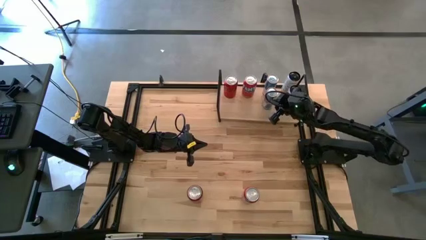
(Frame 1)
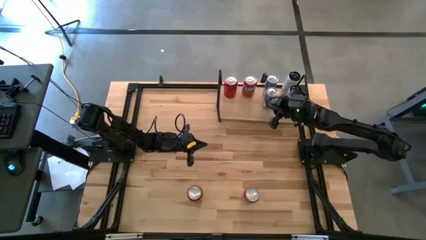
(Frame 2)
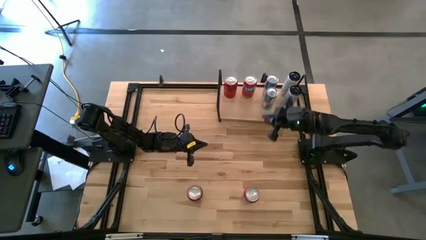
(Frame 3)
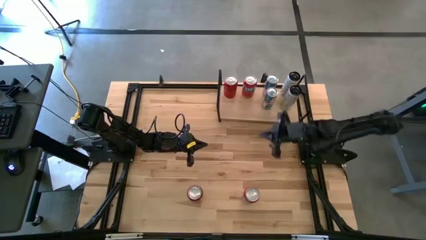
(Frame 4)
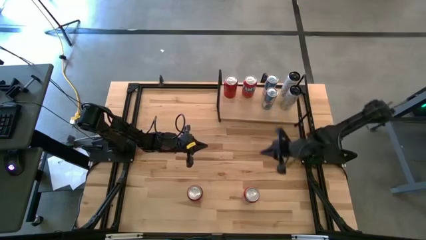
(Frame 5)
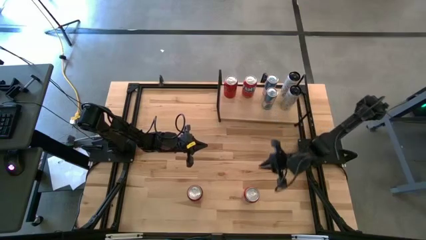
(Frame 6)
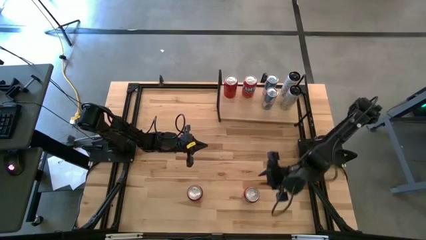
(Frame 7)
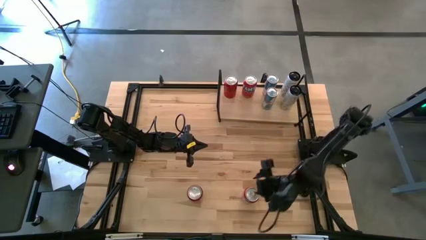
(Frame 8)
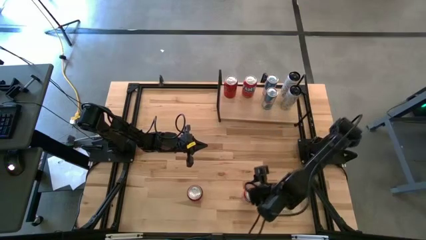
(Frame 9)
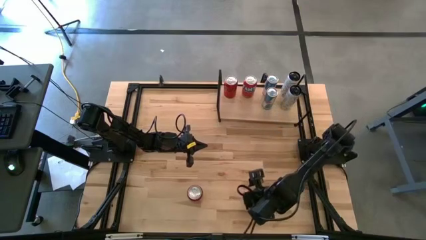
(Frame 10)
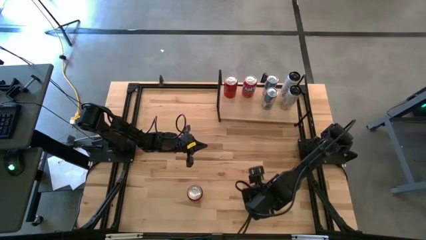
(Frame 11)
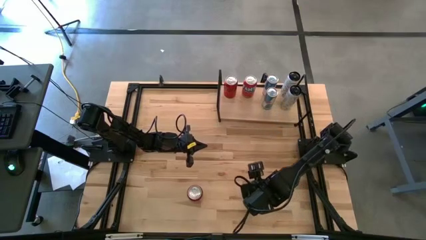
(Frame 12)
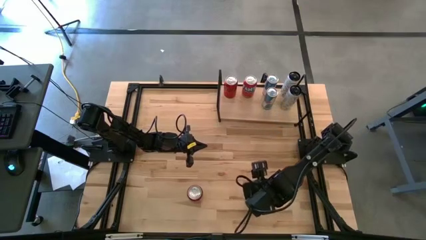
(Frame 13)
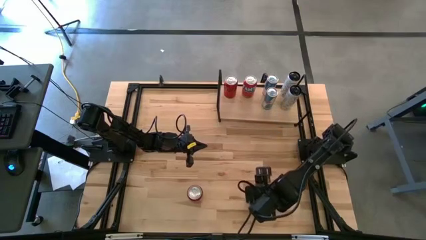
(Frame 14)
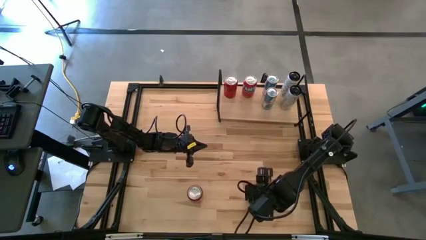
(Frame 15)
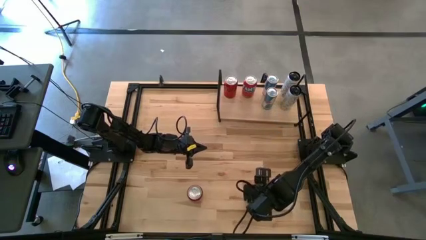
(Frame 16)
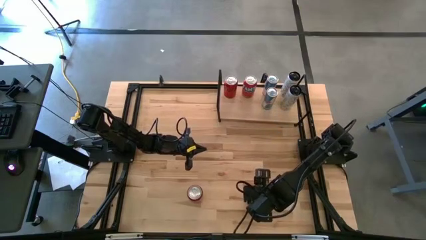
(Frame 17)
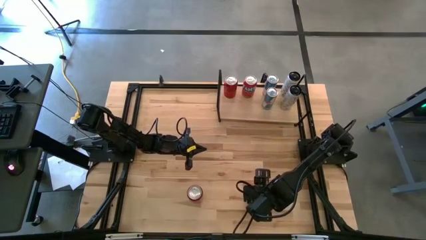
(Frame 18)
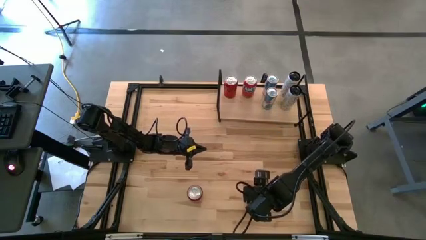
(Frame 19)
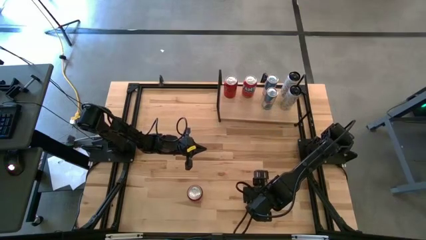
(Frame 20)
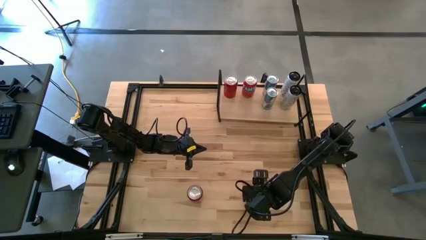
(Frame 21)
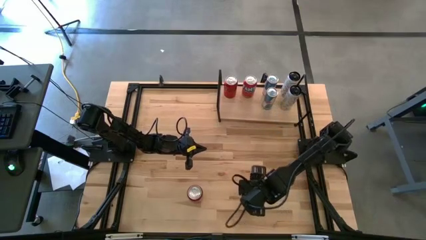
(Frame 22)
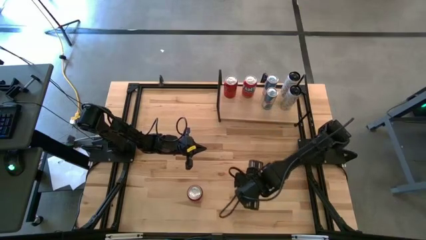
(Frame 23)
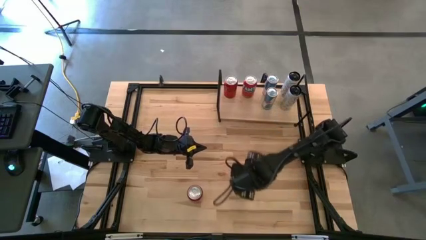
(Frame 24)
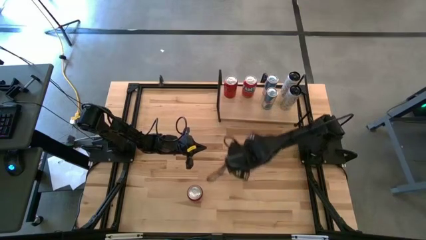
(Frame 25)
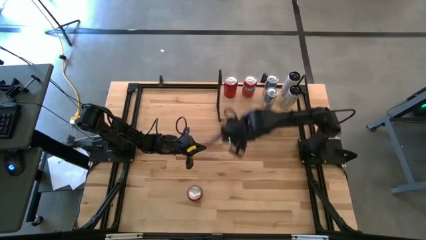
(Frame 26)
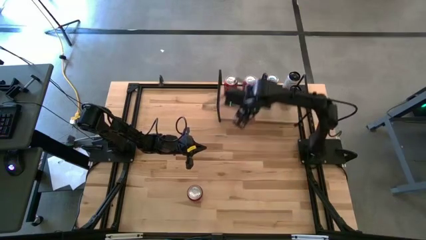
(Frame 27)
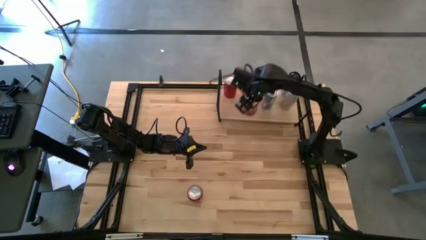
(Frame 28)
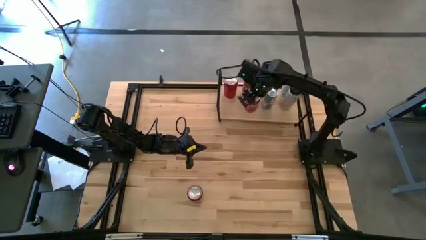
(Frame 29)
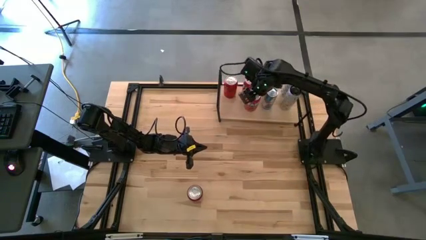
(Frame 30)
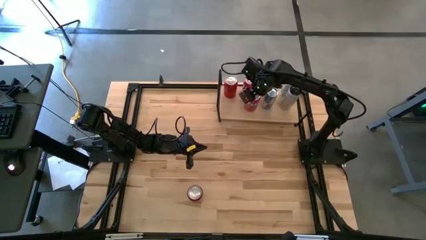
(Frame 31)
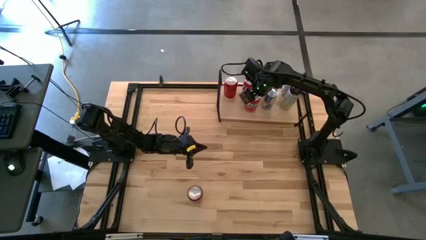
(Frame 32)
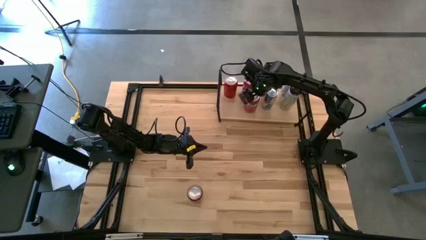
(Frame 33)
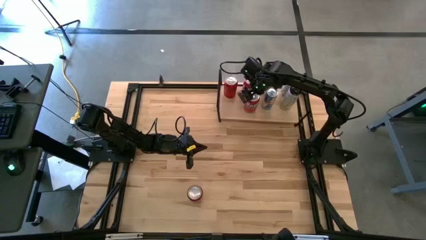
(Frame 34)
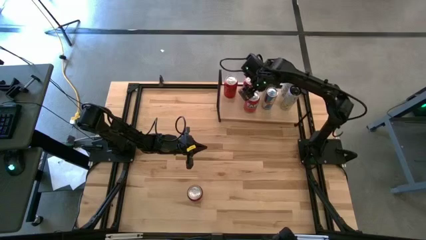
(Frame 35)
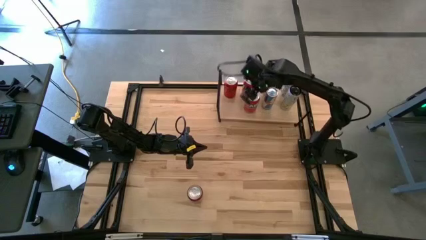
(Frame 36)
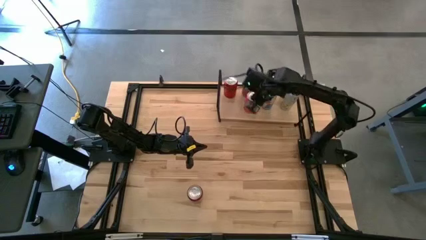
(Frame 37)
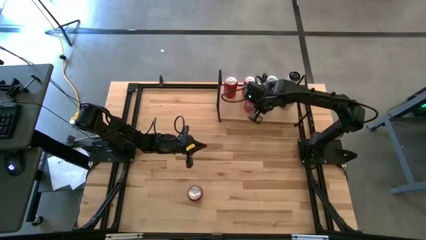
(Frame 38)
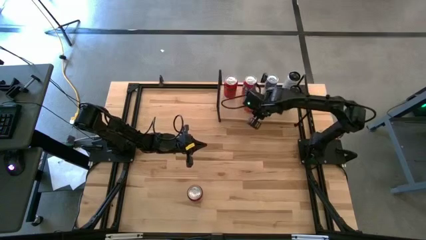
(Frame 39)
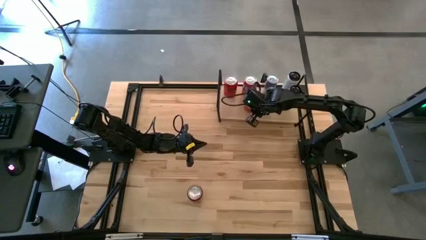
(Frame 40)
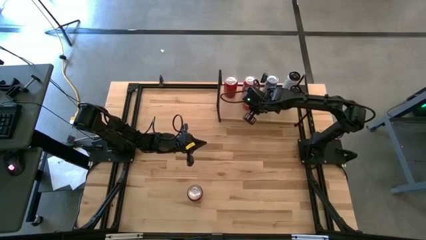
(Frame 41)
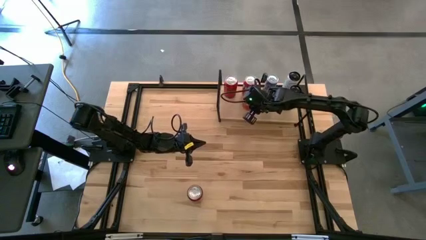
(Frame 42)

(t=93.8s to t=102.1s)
Task: Place canned beverage on shelf
Put the red soda can on the shelf aligned with the other red soda can

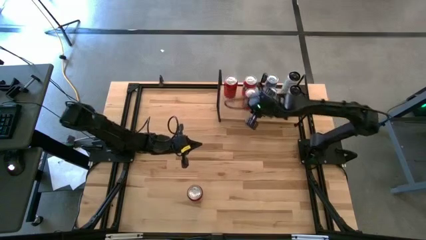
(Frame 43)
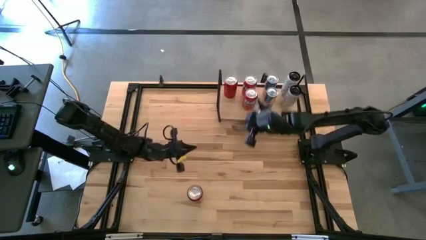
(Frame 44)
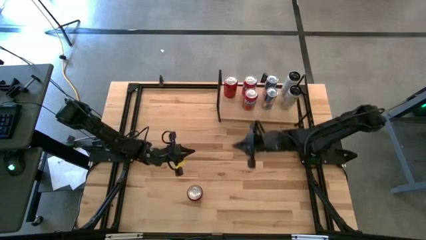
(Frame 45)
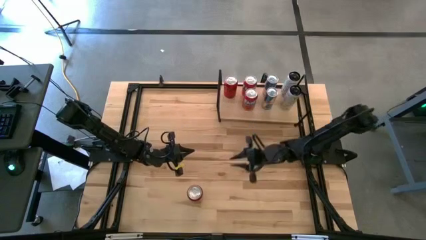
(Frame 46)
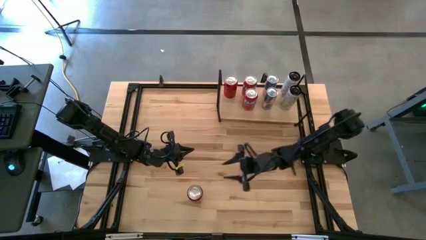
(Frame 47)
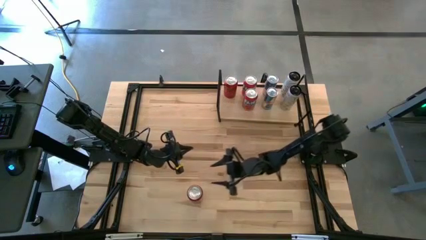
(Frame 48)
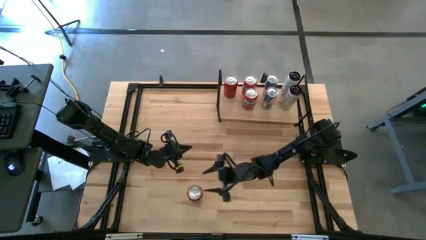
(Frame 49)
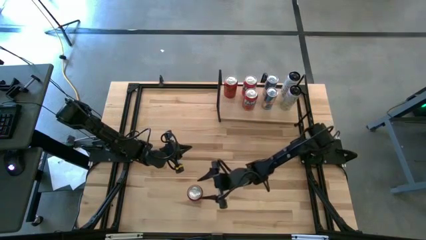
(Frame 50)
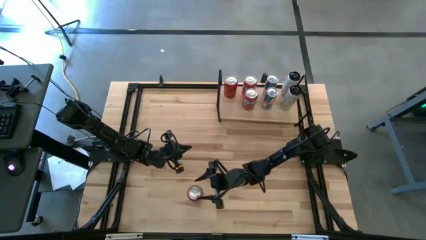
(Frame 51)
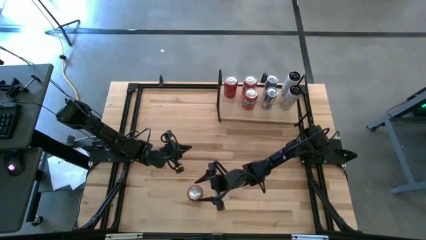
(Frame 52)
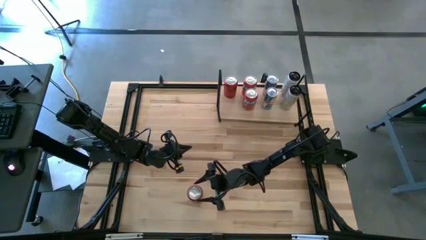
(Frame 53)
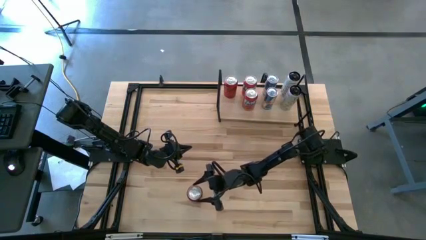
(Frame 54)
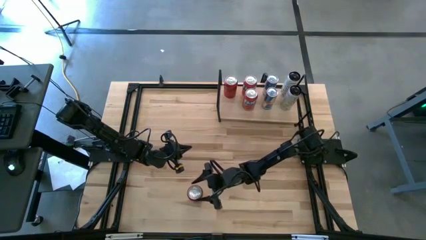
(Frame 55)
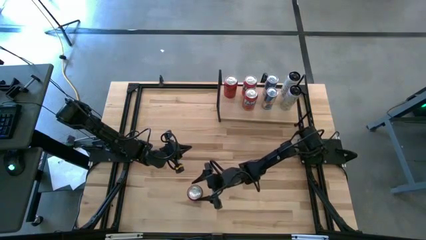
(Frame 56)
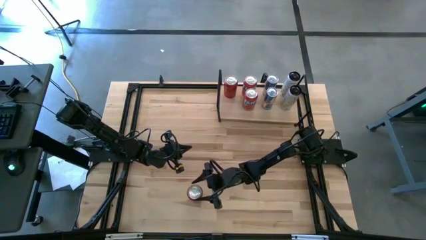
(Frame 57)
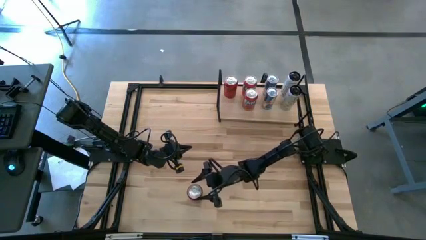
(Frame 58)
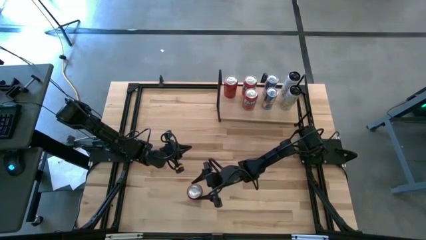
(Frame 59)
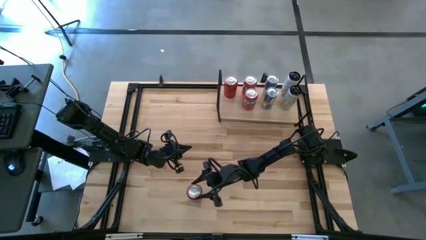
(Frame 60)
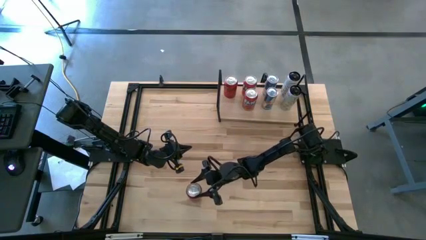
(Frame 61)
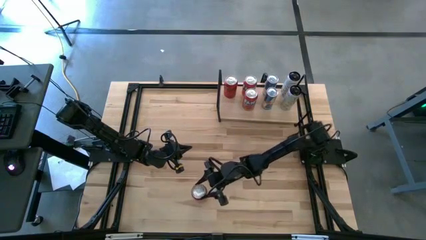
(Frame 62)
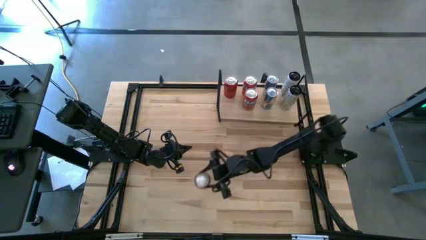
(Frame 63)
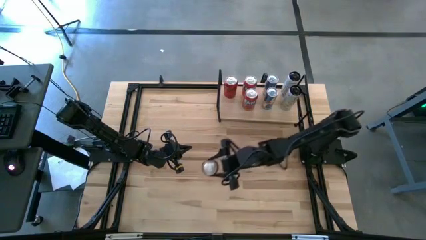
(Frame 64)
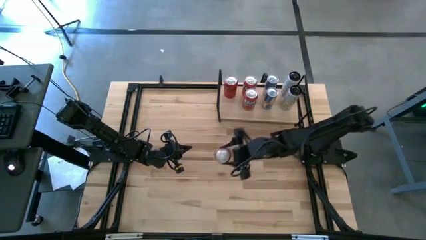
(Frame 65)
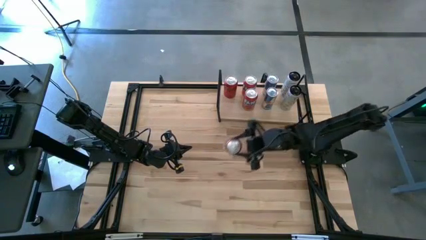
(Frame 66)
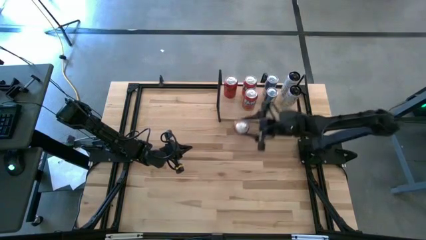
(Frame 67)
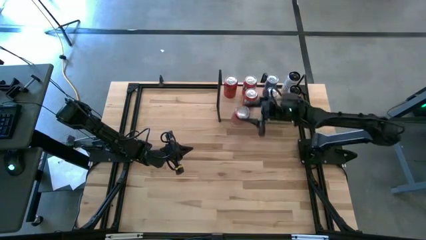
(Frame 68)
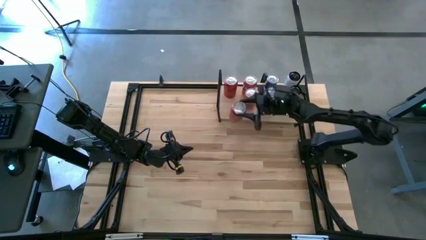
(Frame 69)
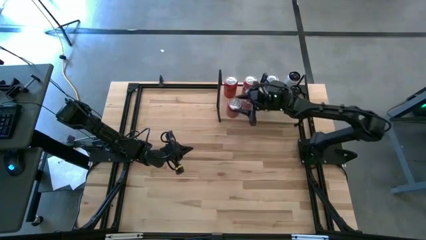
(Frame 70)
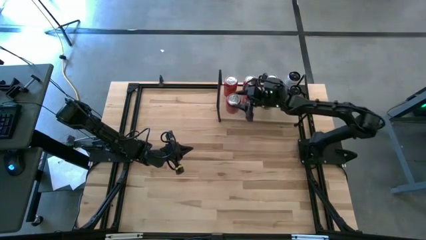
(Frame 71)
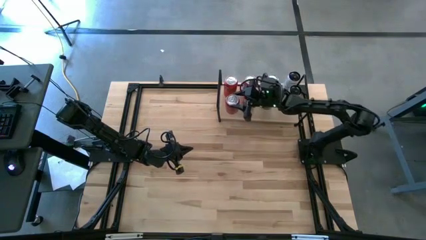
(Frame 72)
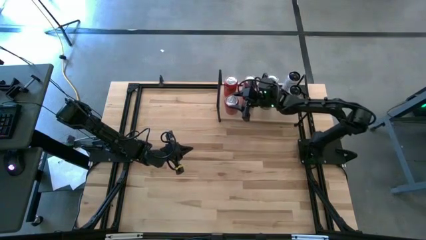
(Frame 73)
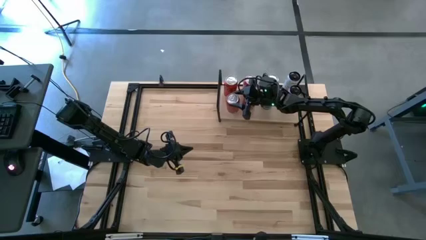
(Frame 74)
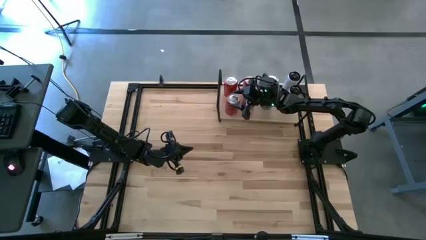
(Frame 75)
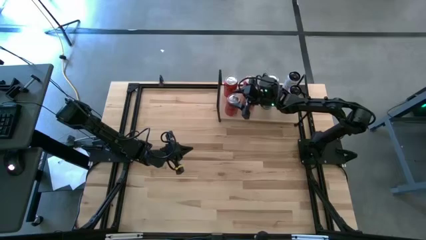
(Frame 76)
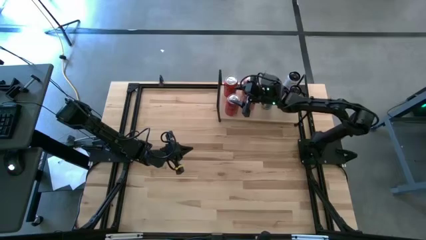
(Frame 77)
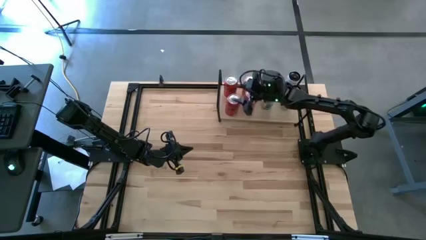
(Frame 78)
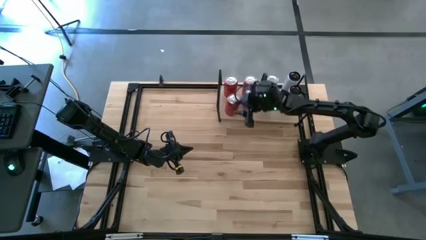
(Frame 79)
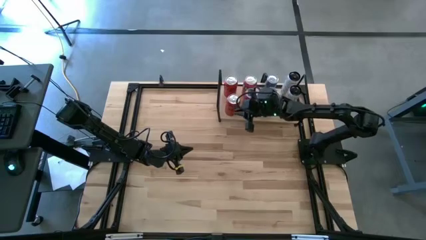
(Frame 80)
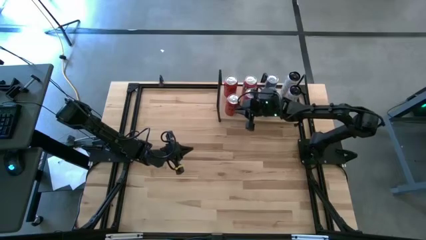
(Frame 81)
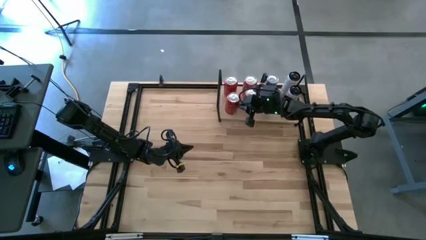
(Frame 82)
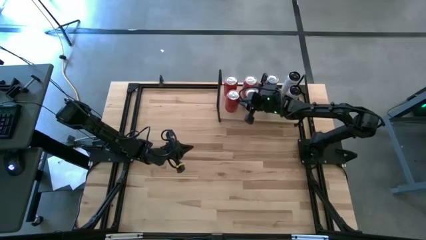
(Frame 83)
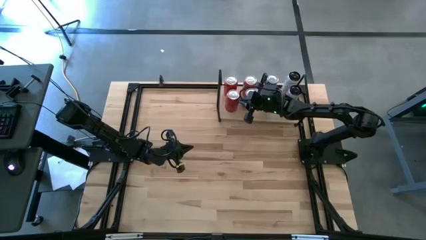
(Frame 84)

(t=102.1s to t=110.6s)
Put the red-black soda can on the shelf aligned with the other red-black soda can
